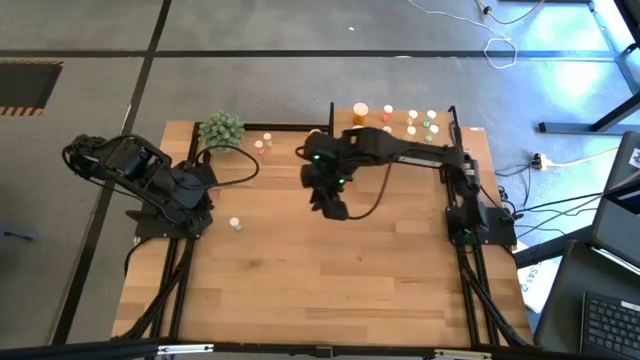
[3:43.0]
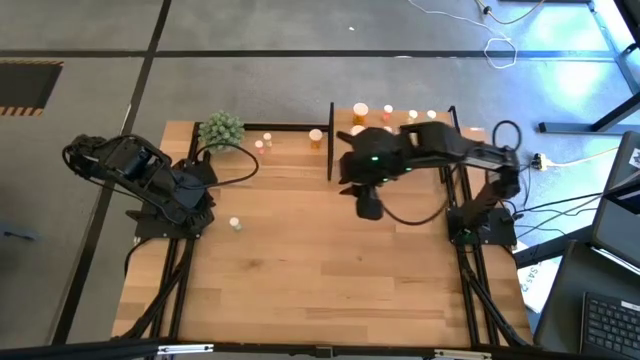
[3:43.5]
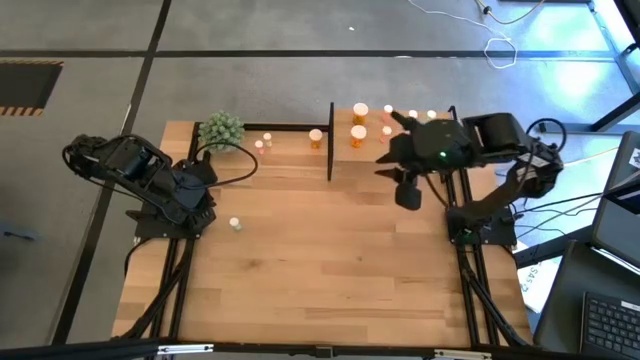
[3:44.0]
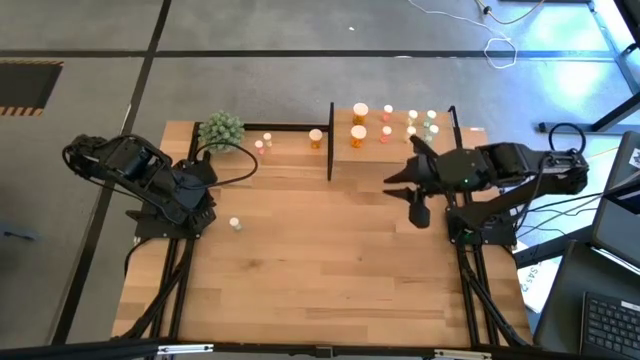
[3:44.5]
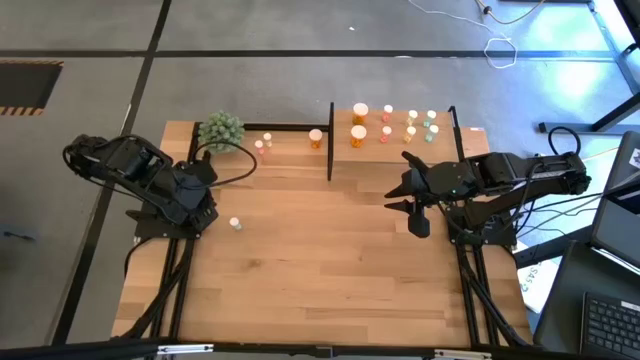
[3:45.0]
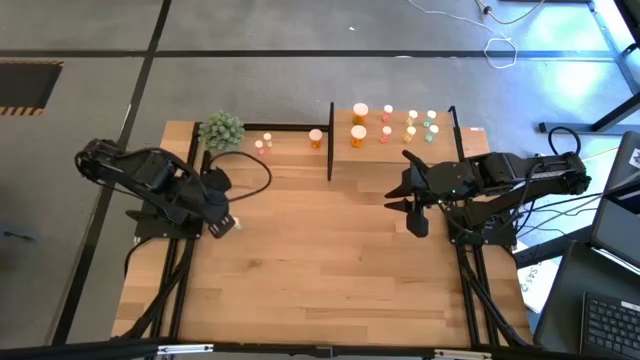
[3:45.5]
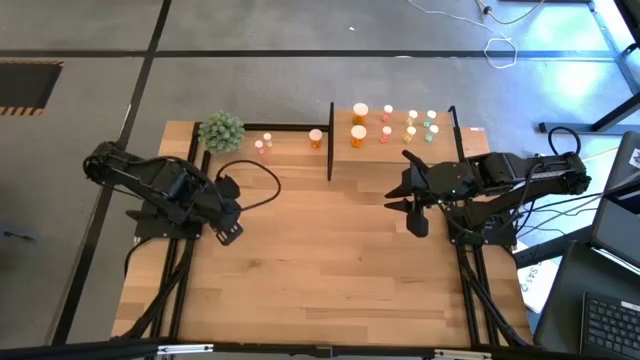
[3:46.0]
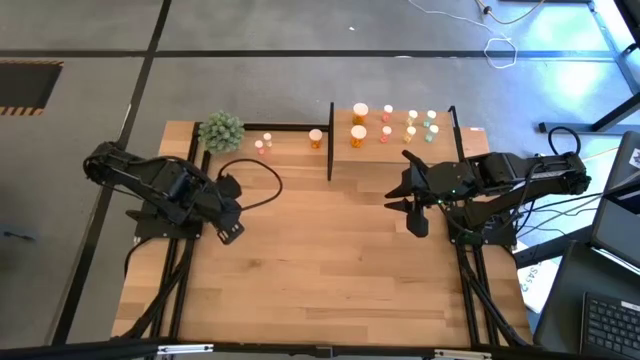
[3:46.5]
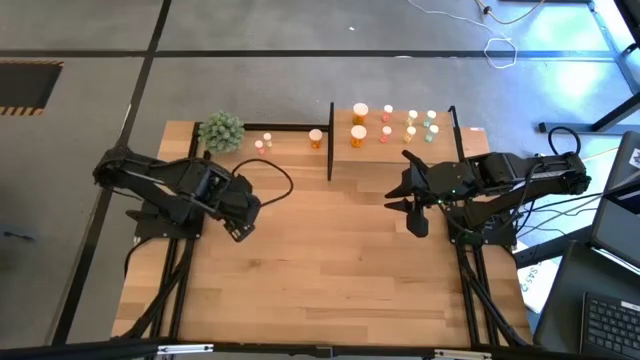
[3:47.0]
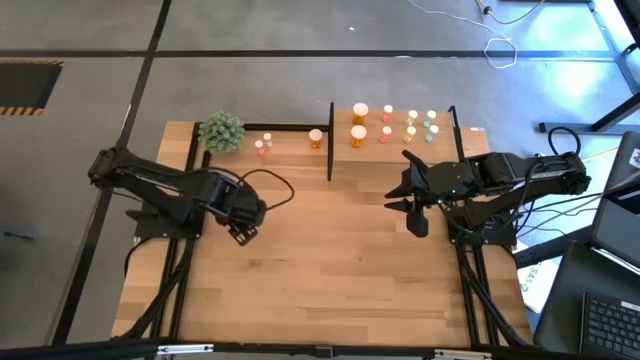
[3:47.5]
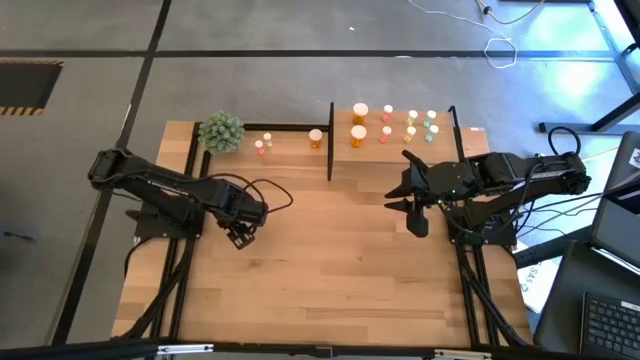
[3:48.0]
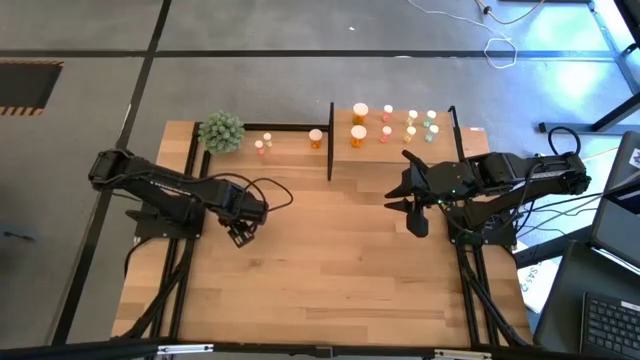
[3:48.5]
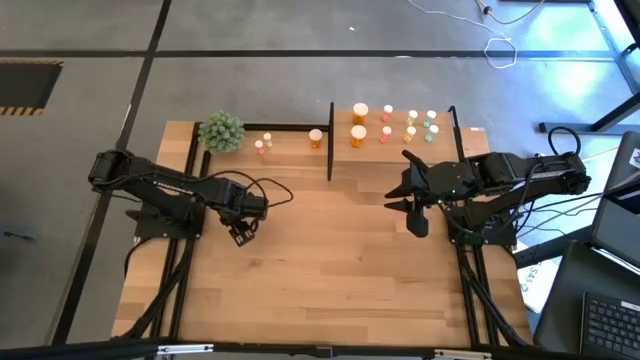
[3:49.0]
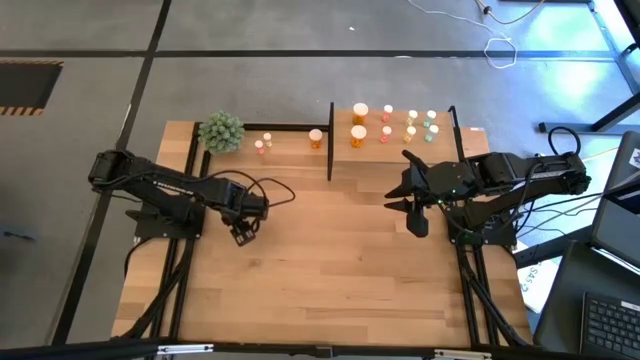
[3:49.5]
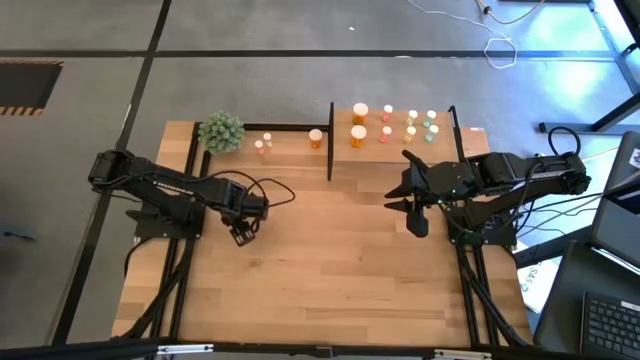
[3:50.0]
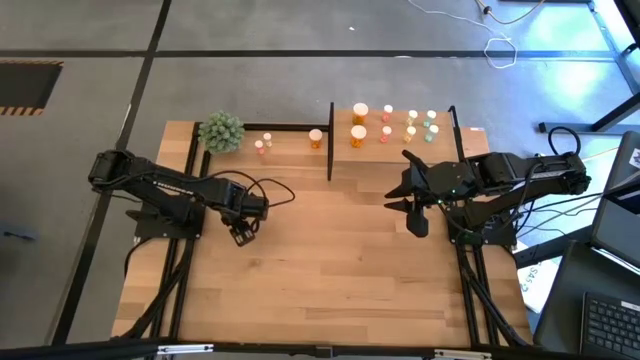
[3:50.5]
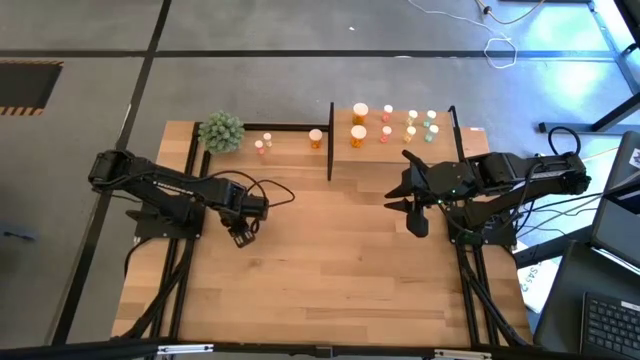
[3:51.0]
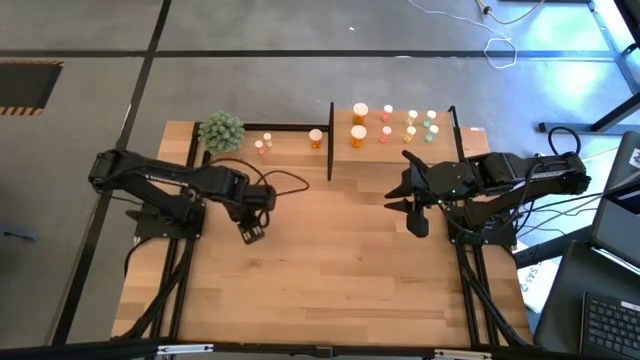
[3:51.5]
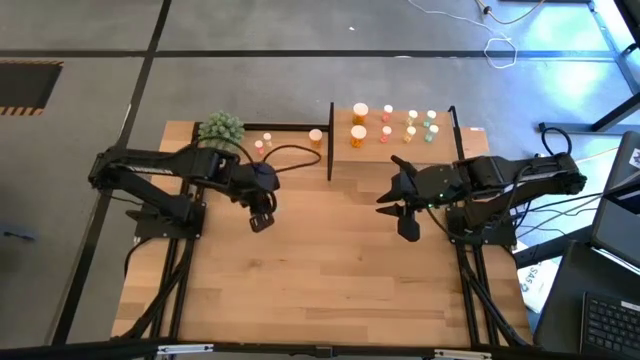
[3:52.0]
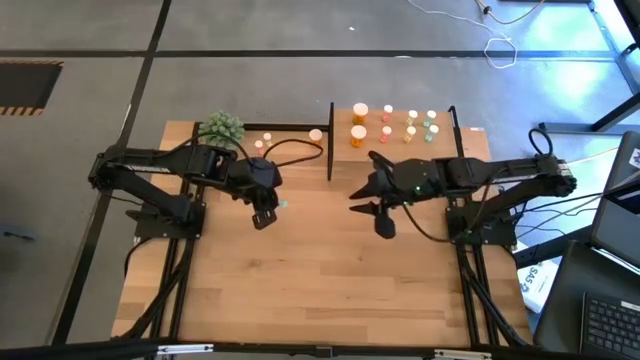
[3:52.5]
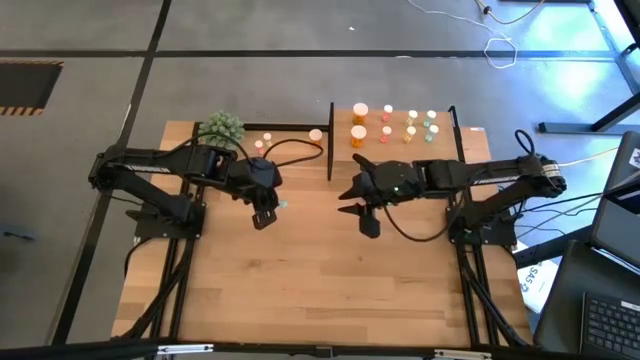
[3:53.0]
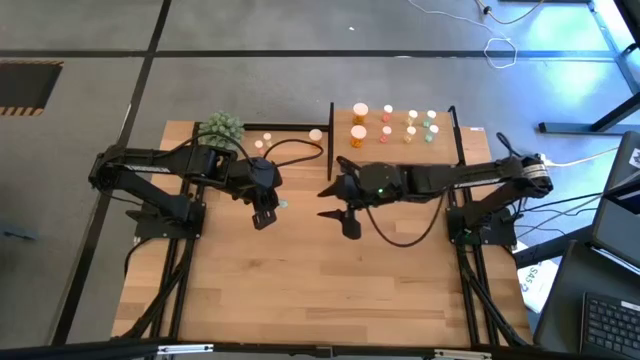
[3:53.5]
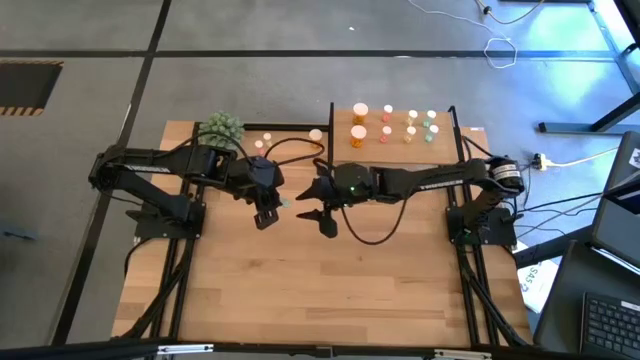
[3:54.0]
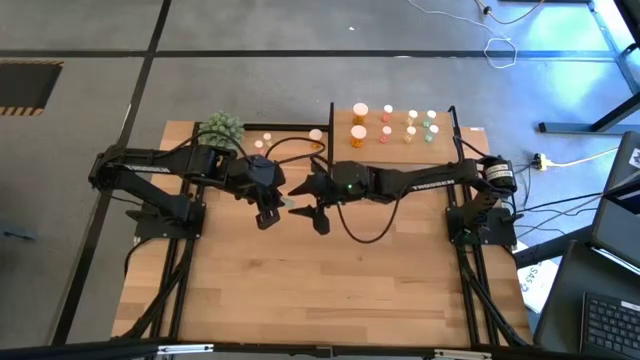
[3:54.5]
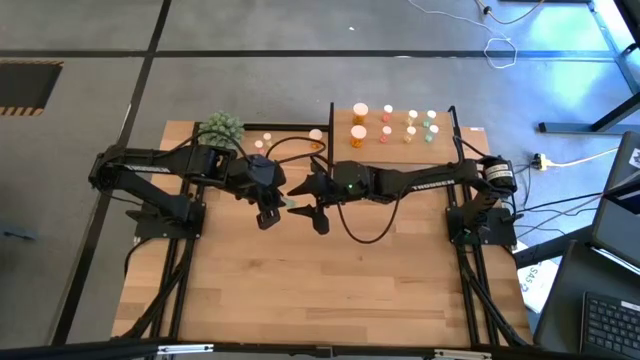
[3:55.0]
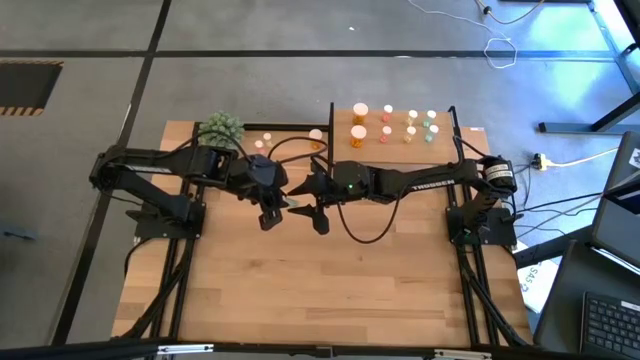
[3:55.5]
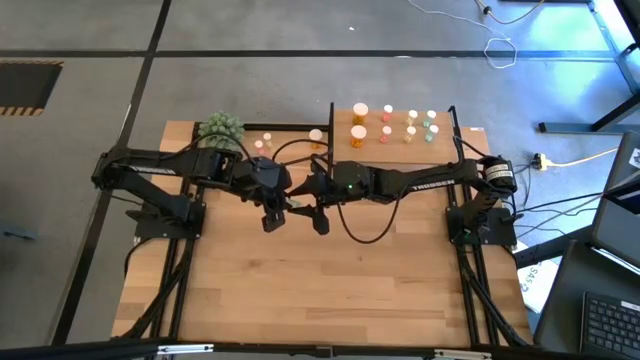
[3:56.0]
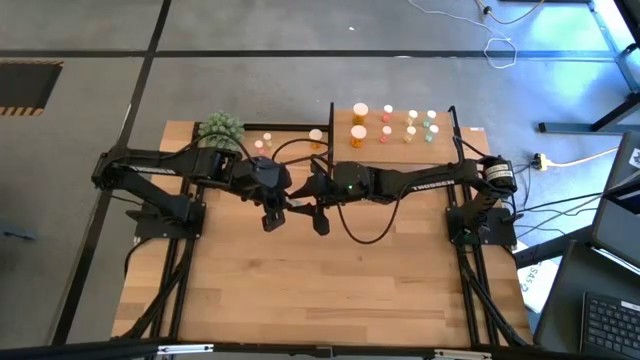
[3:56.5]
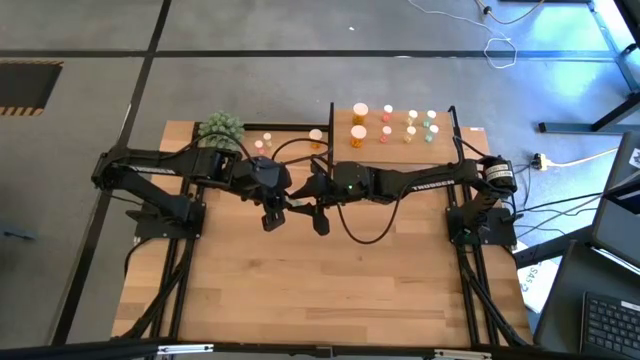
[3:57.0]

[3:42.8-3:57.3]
Task: Pick and place medicine bottles onto shelf by color
Put the blue pill bottle on the shelf aligned with the other blue pill bottles

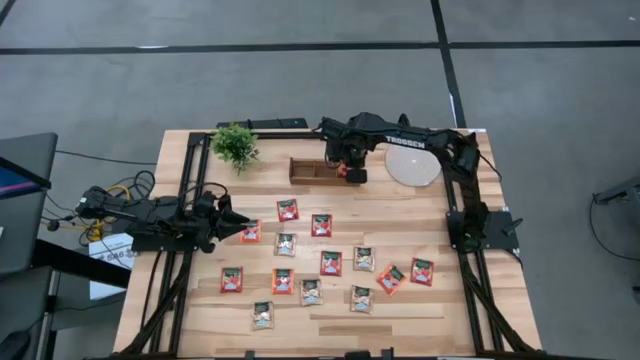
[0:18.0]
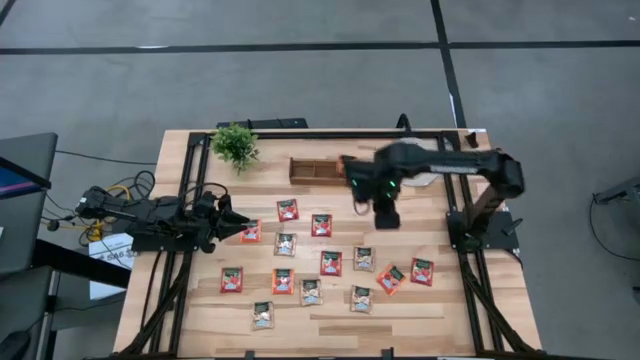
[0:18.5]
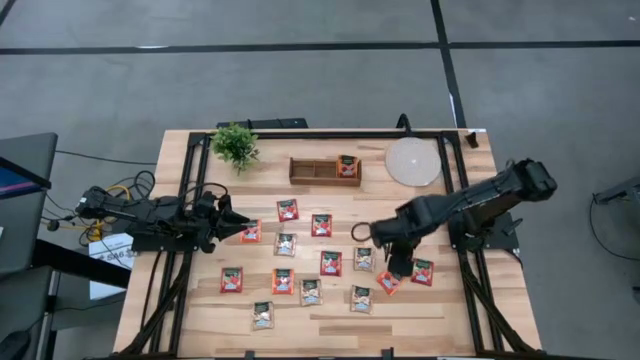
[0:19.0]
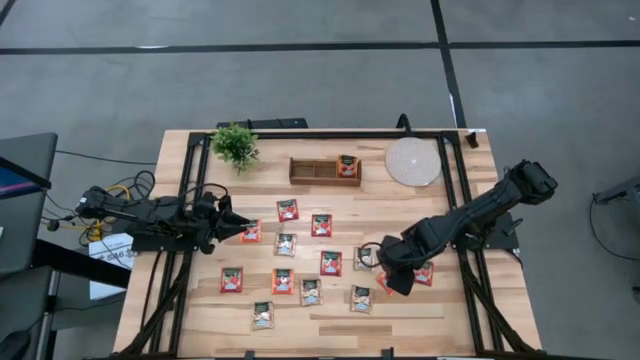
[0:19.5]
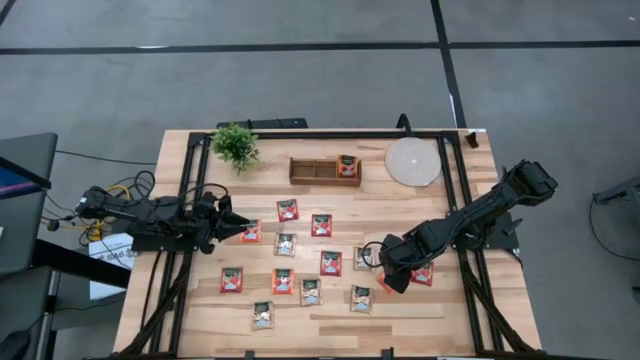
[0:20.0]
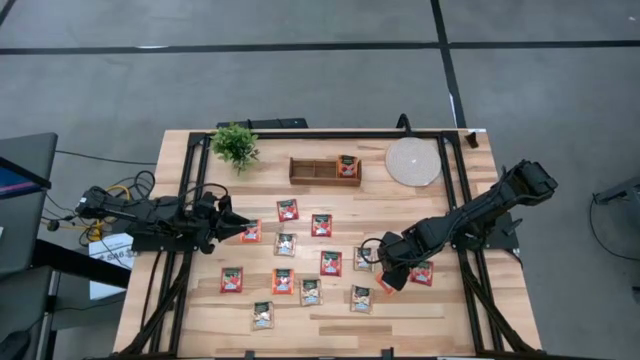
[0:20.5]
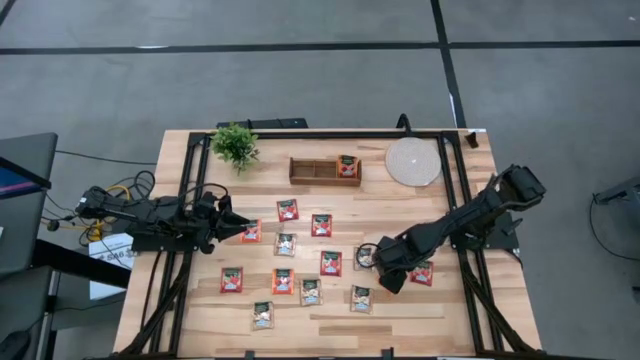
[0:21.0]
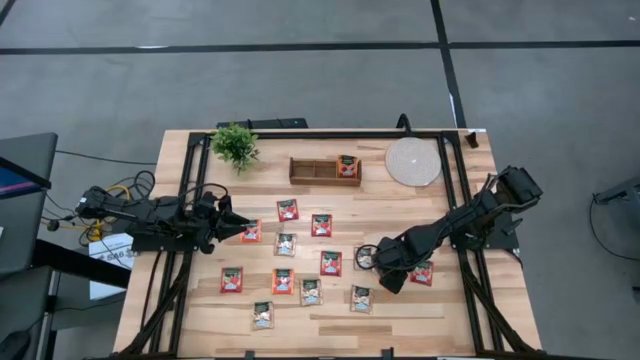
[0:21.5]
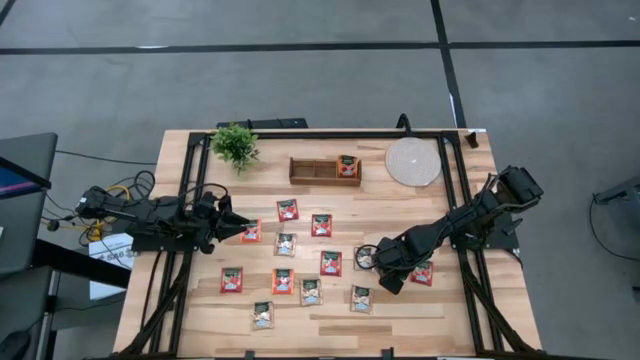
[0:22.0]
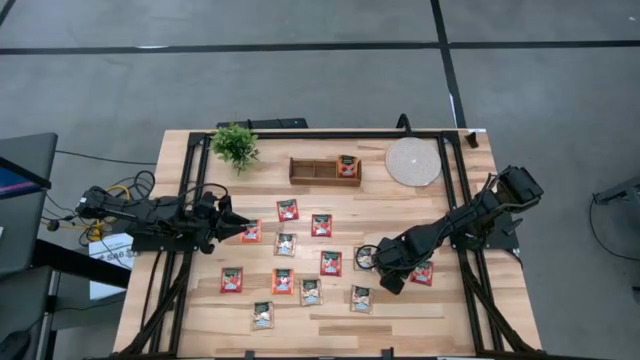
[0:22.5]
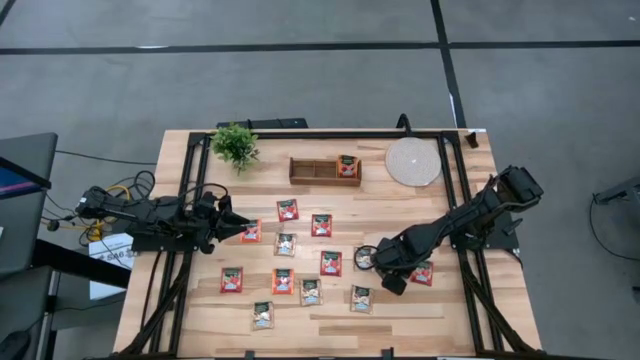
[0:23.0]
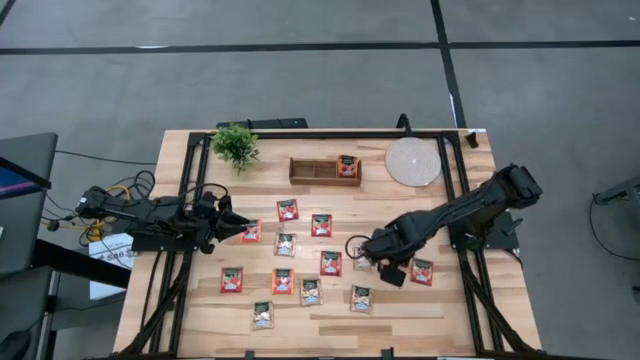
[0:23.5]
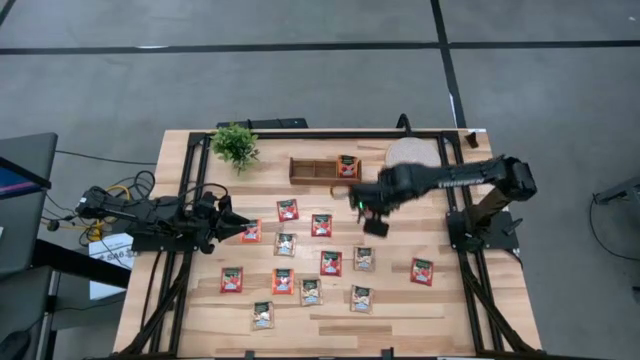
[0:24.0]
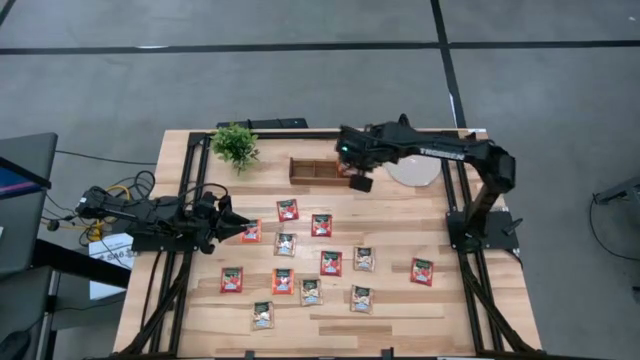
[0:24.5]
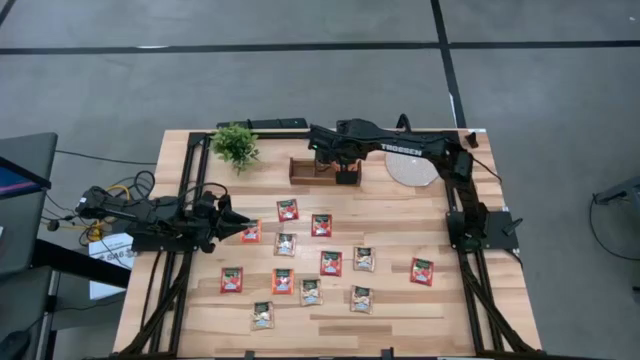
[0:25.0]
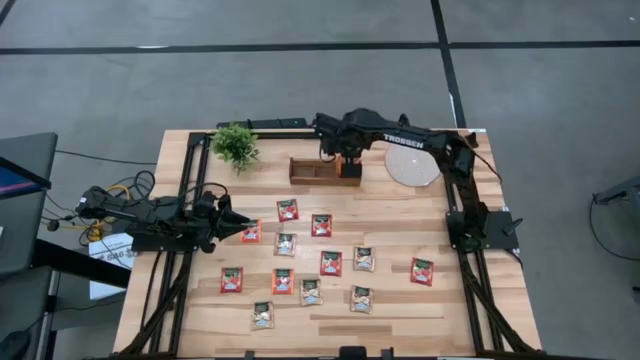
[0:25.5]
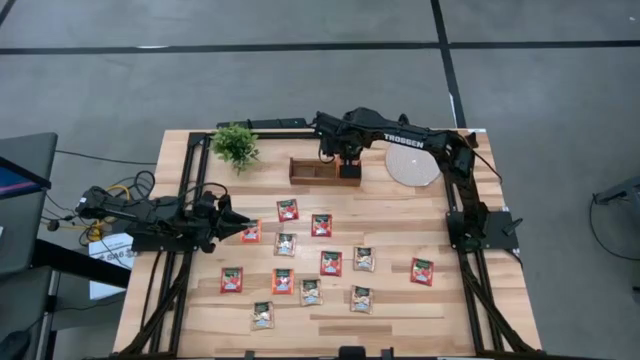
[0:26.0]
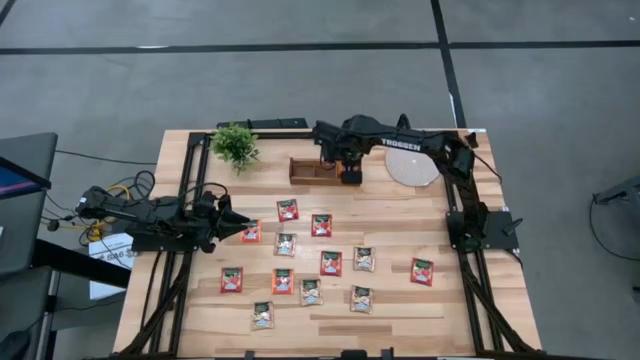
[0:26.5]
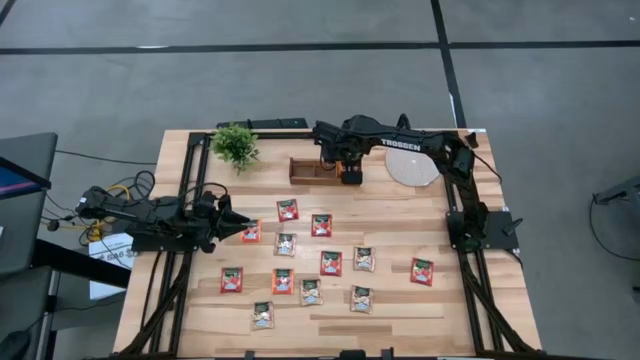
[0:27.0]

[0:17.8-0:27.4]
Task: Pick & Place Tea
Put the orange tea bag into the right section of the wooden organizer
